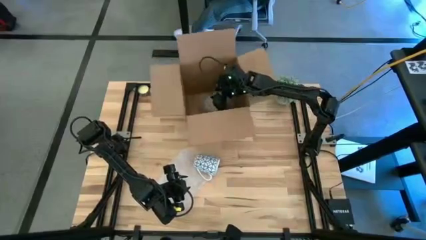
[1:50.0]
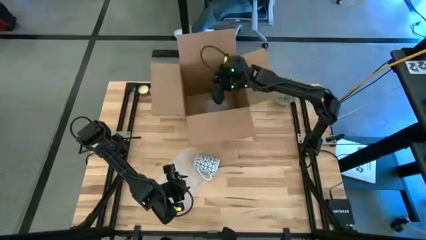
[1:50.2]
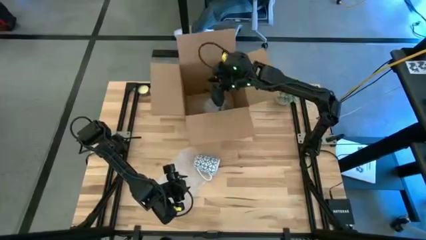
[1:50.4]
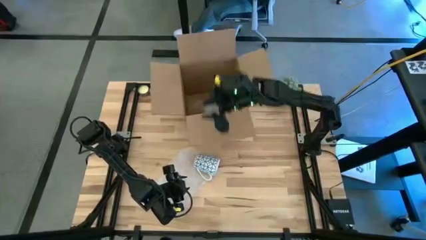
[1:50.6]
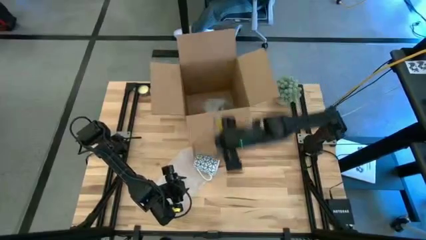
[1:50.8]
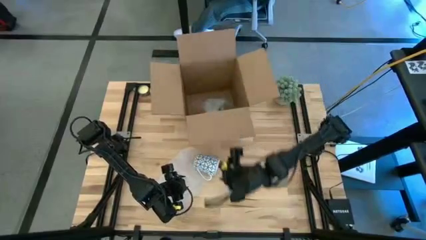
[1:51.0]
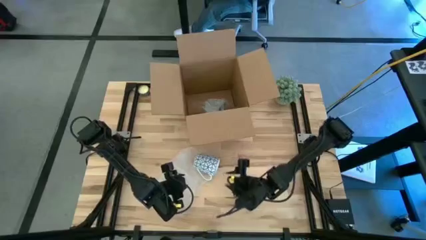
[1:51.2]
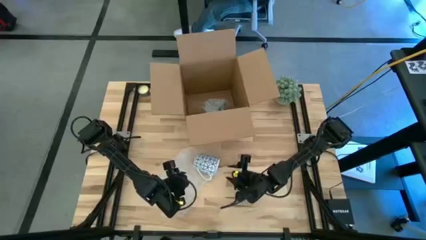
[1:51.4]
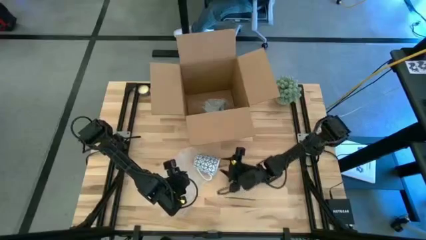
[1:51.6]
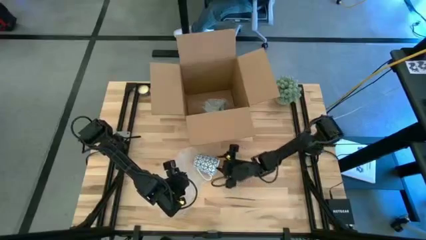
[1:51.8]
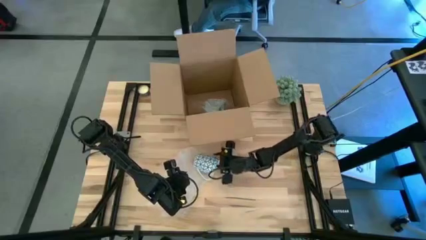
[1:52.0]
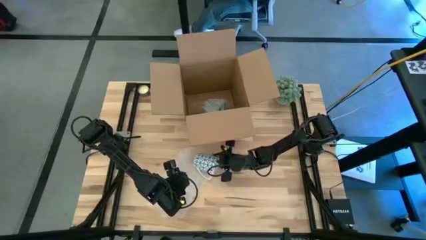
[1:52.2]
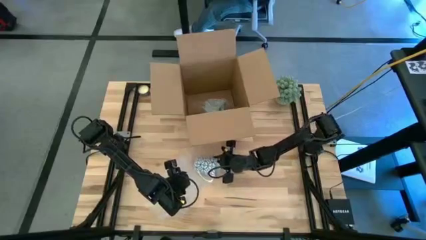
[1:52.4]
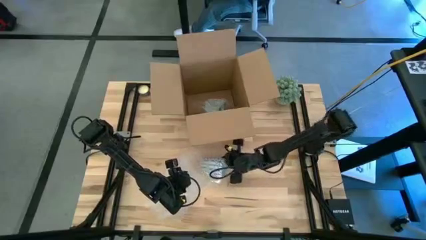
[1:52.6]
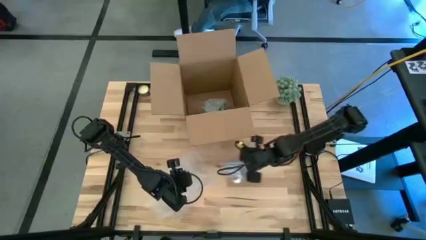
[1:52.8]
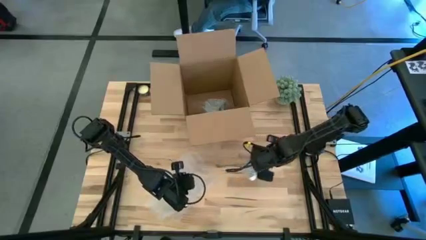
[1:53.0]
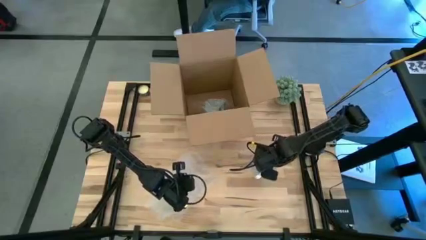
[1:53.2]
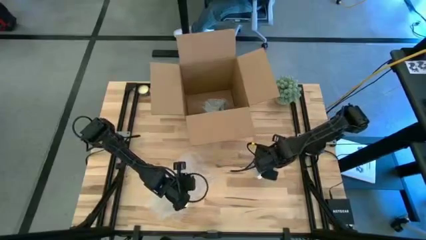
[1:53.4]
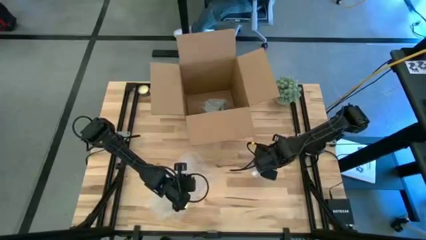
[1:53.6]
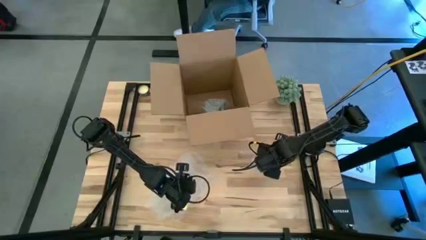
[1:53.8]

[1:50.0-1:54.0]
Task: wrap mug
Adjust the white patterned mug

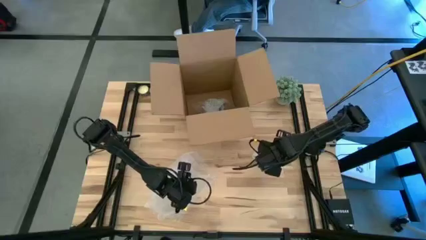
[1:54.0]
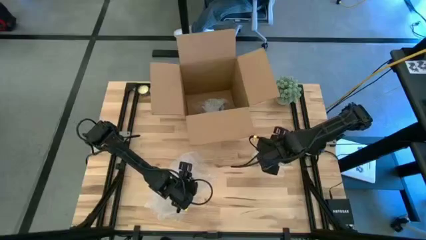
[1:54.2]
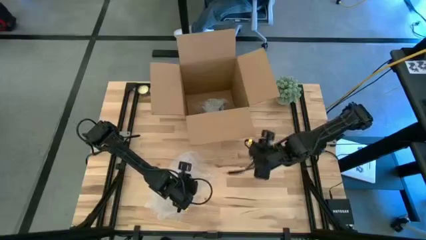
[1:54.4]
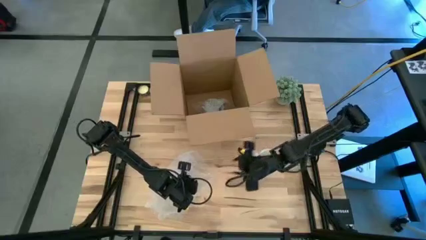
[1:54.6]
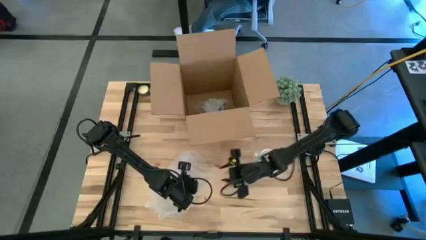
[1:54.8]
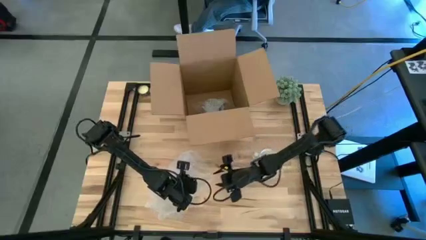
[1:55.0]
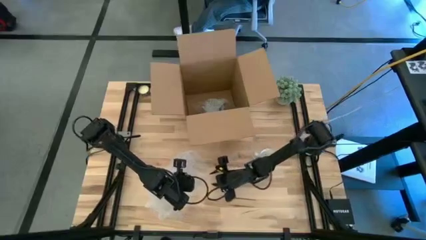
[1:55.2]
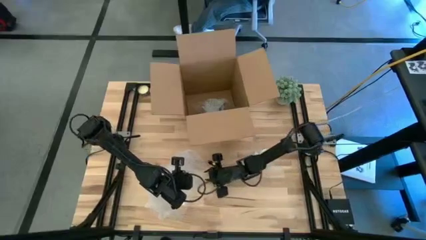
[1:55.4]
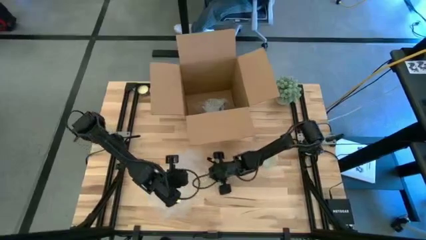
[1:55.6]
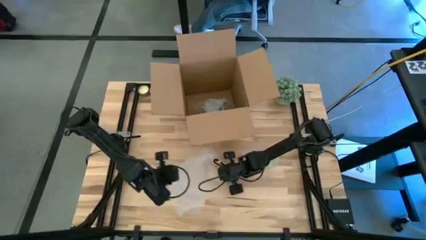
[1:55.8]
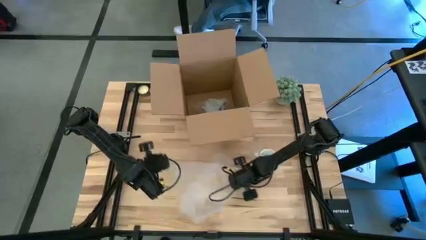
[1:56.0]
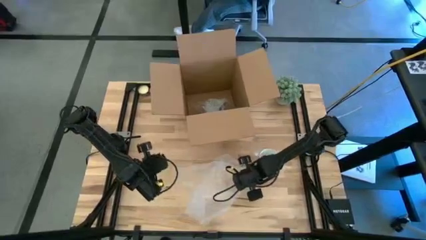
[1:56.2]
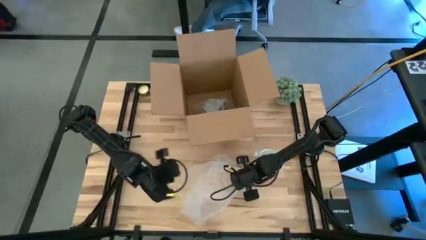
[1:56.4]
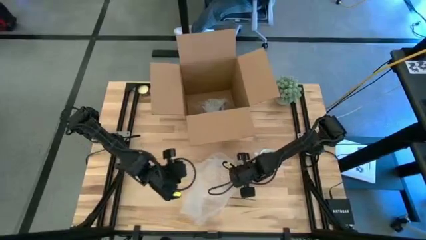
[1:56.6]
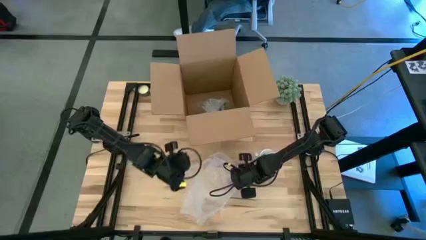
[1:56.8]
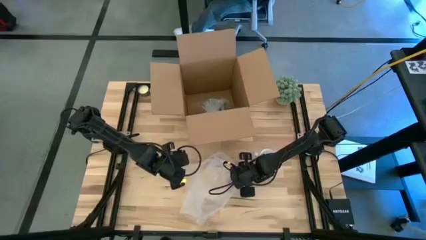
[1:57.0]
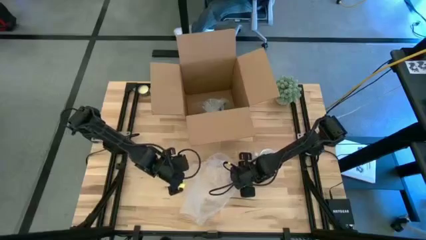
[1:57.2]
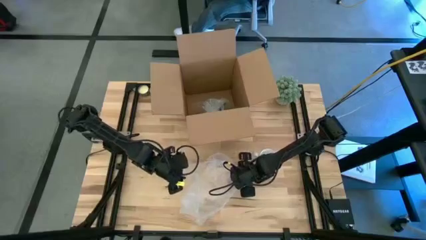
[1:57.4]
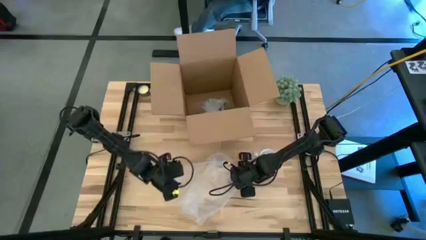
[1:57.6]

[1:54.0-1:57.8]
Prepare the transparent bubble wrap

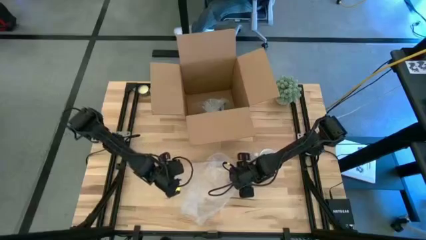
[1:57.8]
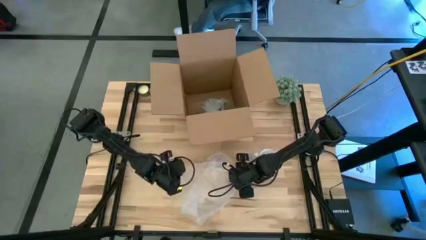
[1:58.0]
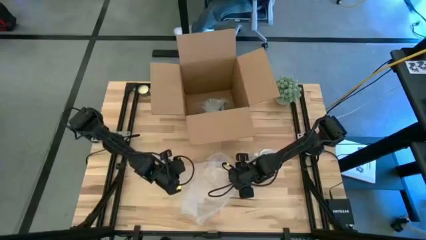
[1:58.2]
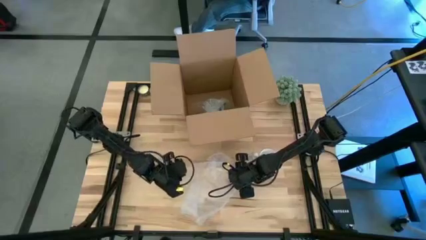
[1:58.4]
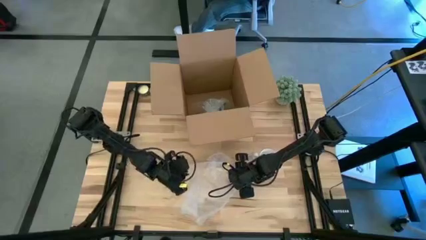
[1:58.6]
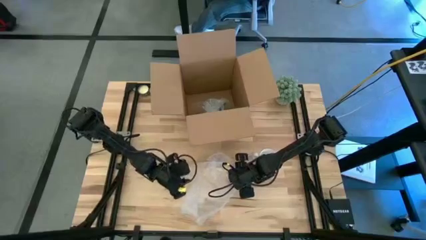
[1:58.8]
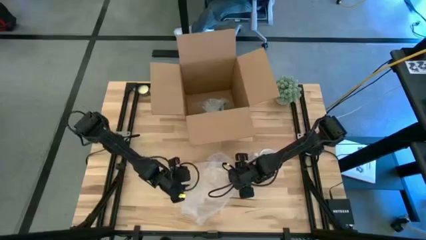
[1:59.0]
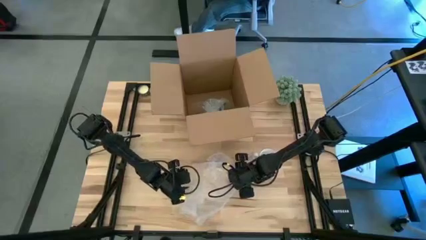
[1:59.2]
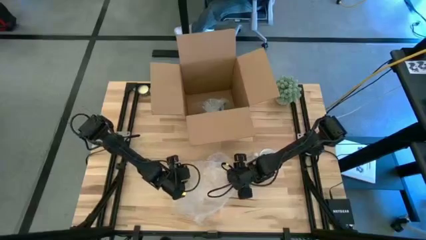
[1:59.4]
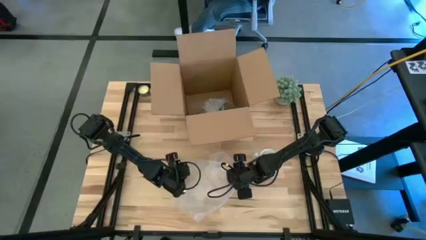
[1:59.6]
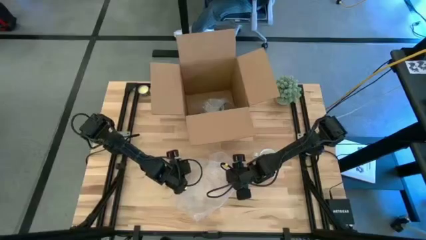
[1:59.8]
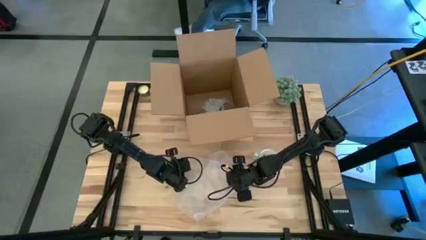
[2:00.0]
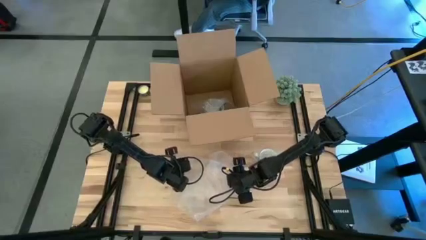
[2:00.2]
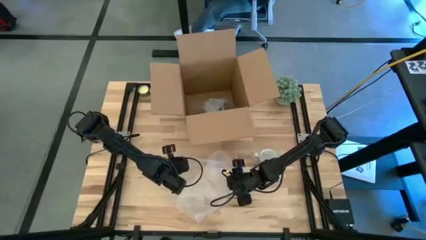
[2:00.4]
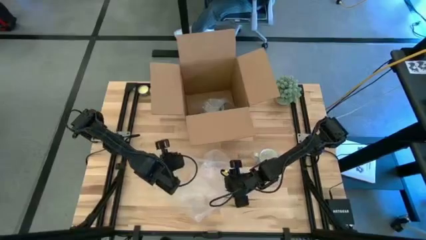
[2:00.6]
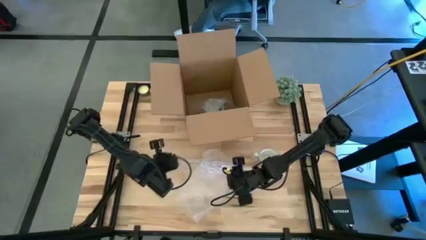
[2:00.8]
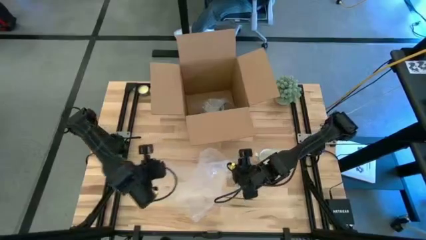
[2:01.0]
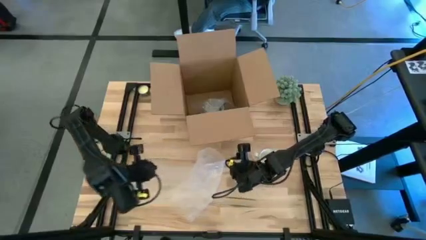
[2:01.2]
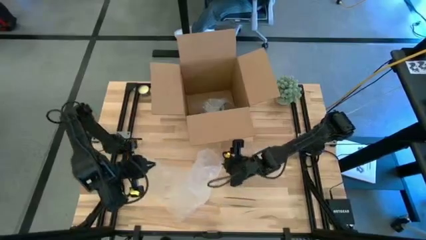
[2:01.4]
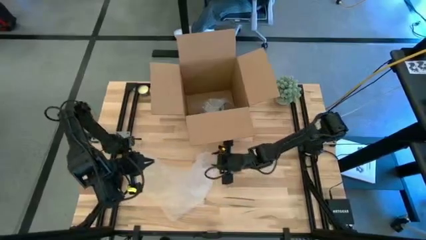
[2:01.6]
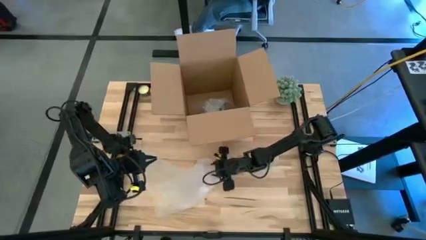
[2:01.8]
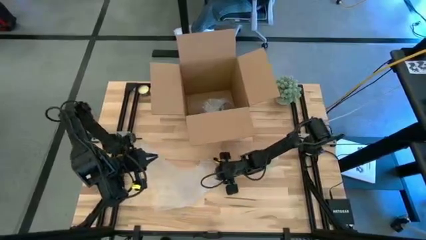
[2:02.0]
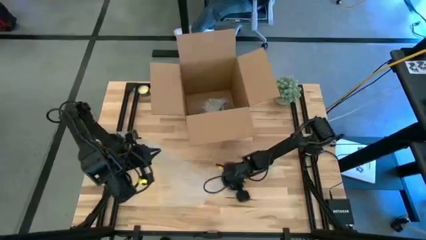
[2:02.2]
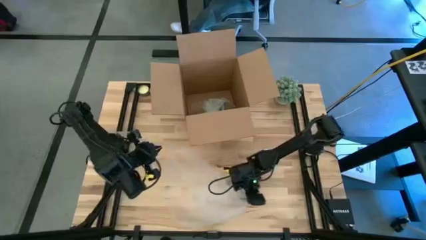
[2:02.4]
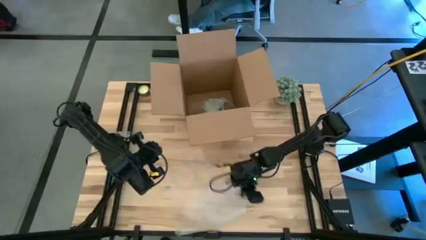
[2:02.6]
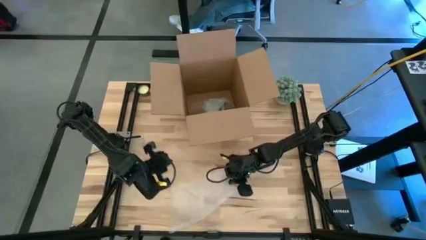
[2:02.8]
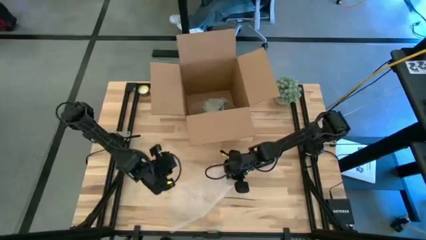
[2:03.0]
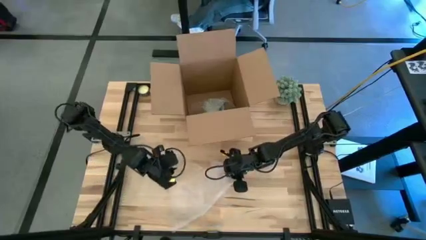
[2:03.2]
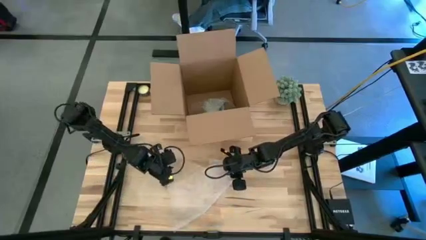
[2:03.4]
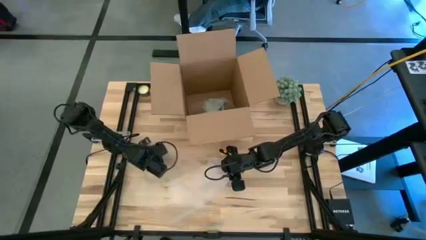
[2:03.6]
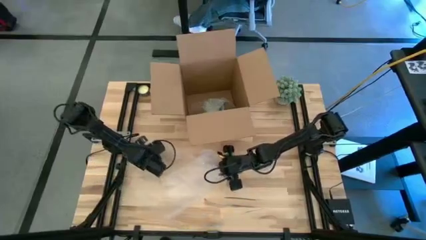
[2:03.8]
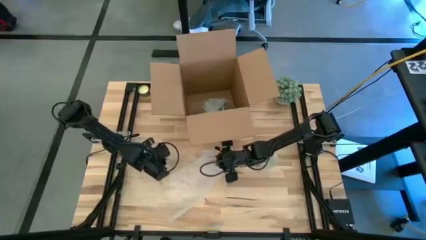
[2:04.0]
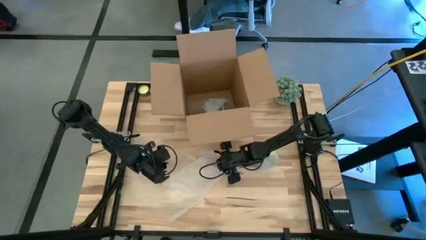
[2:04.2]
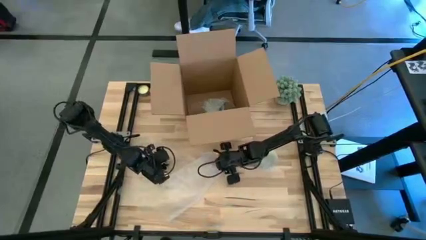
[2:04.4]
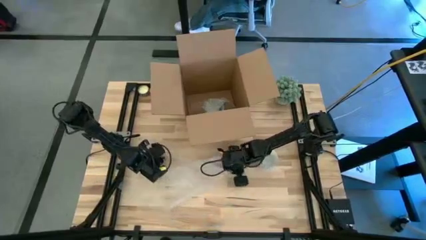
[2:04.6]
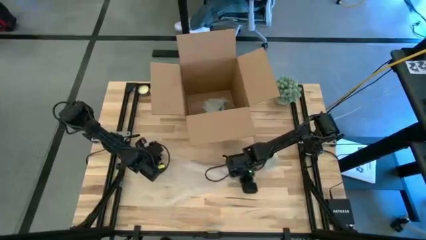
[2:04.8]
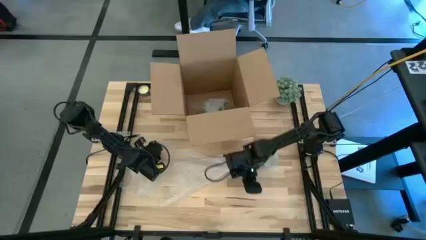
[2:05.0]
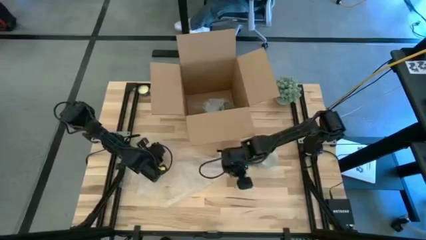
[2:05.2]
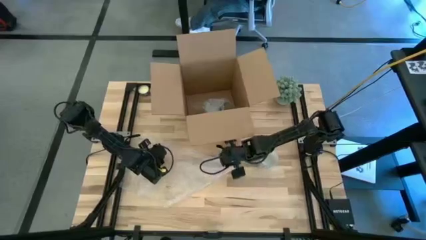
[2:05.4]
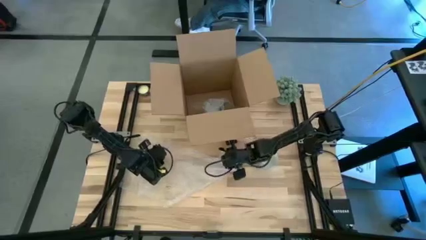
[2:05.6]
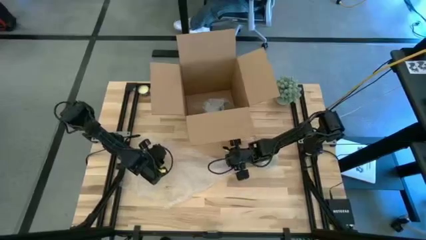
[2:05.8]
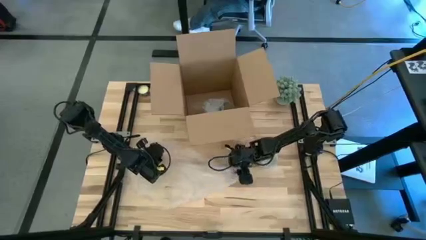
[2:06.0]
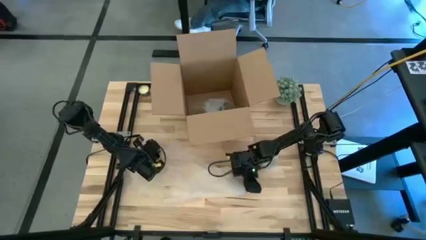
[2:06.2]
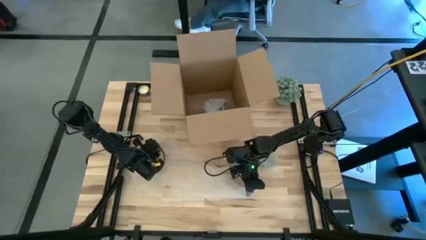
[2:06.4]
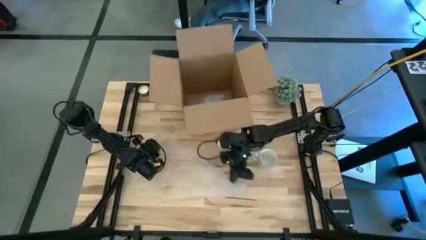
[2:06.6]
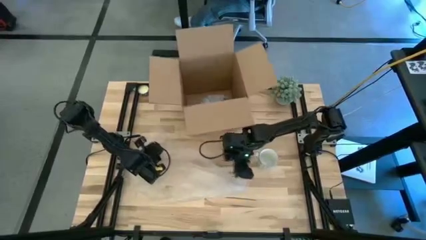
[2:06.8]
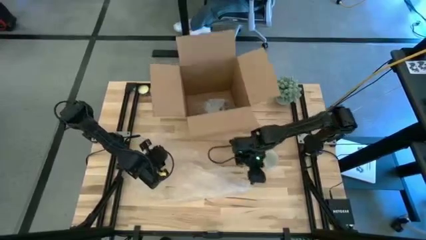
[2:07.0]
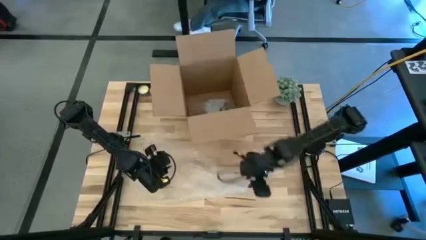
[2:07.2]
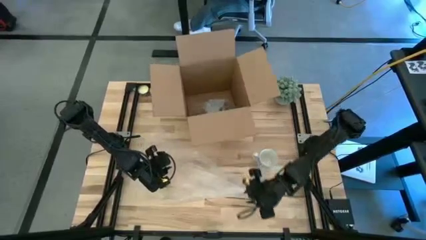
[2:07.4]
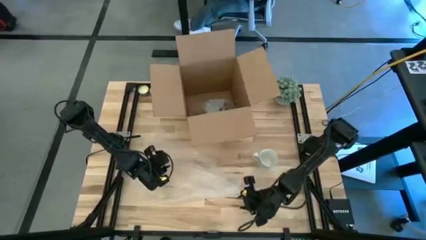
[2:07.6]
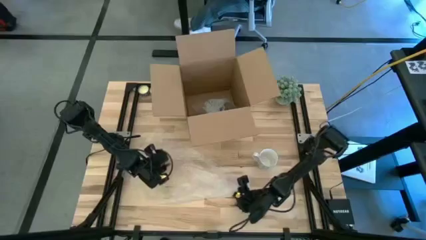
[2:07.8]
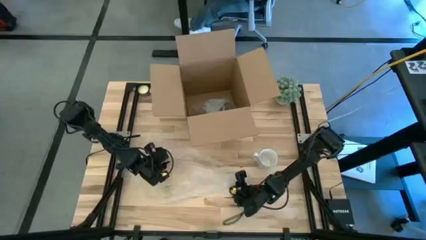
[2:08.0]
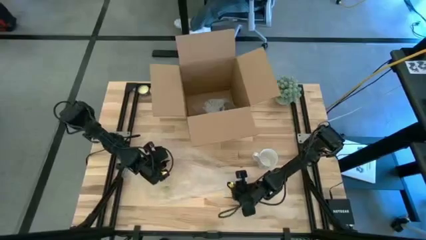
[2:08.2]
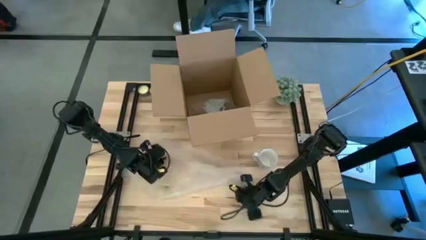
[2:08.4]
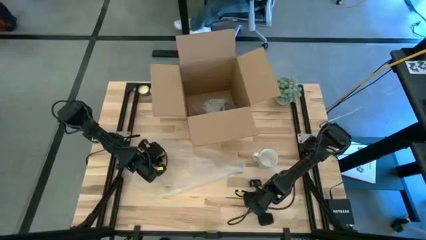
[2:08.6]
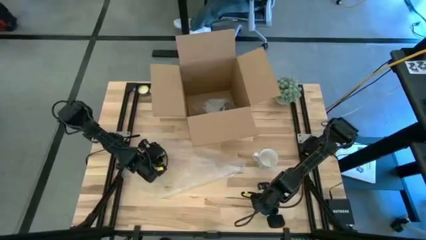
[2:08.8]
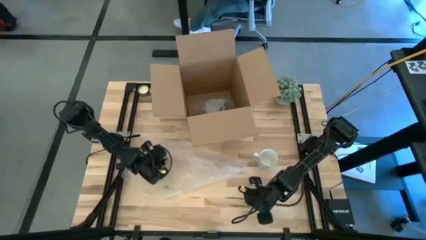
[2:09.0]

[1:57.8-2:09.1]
Prepare the transparent bubble wrap
